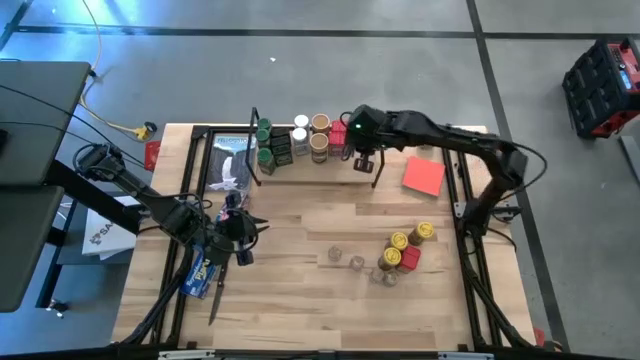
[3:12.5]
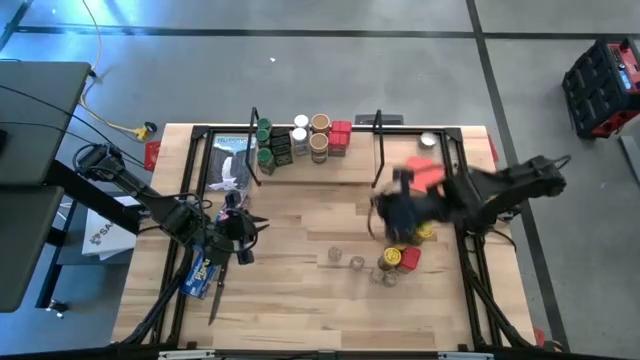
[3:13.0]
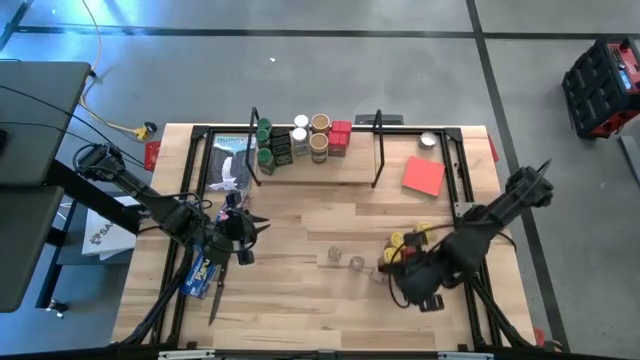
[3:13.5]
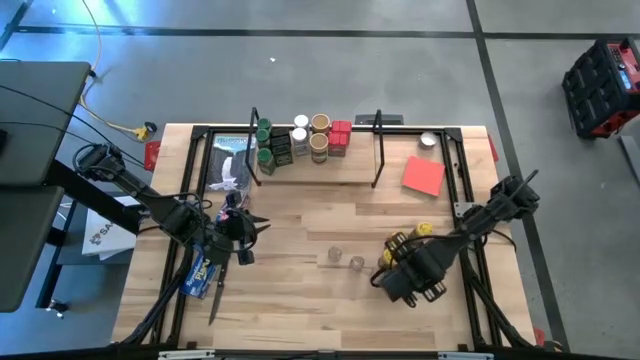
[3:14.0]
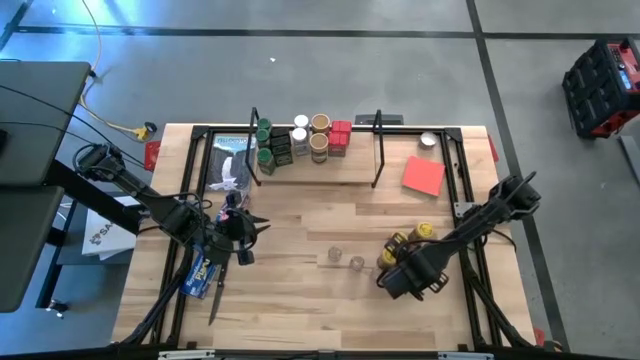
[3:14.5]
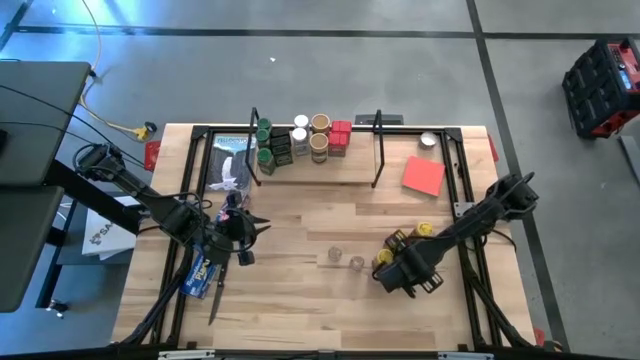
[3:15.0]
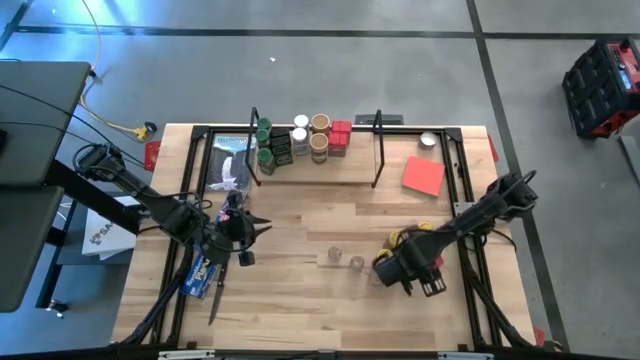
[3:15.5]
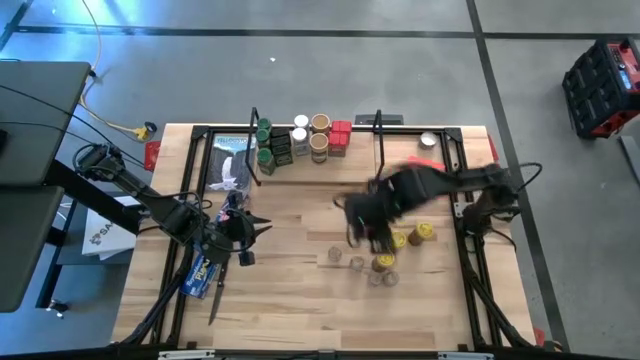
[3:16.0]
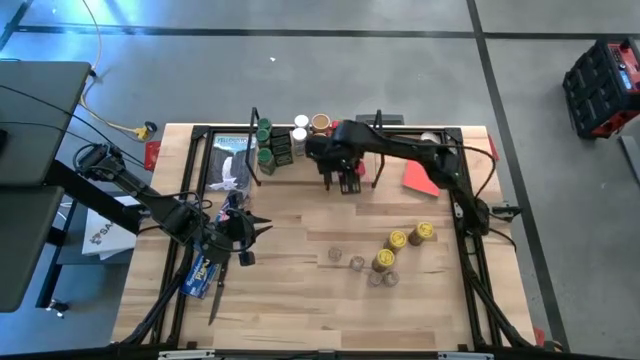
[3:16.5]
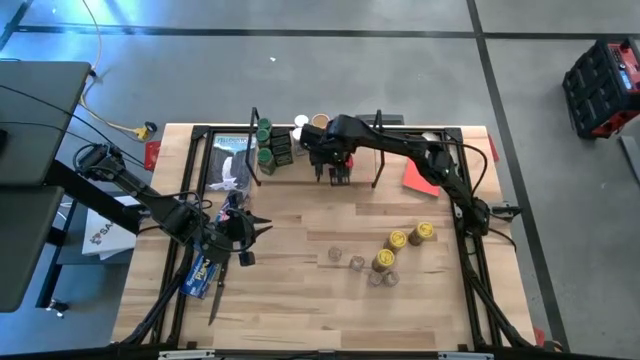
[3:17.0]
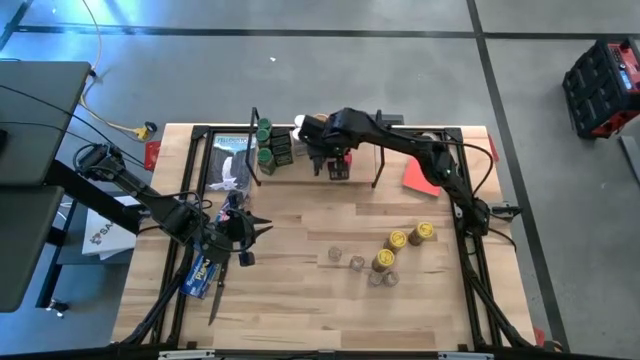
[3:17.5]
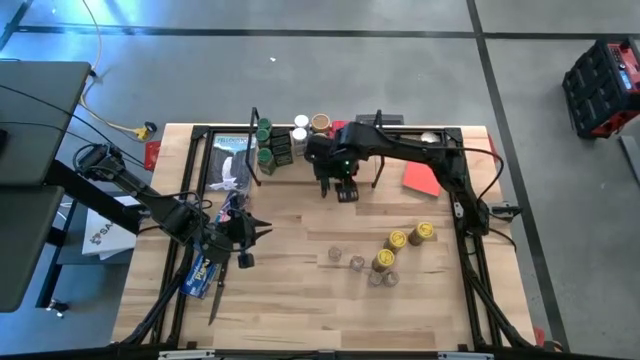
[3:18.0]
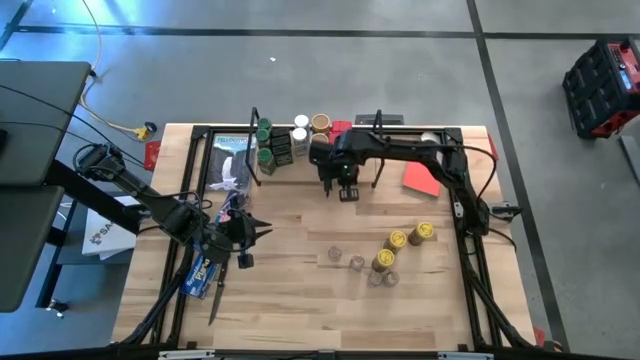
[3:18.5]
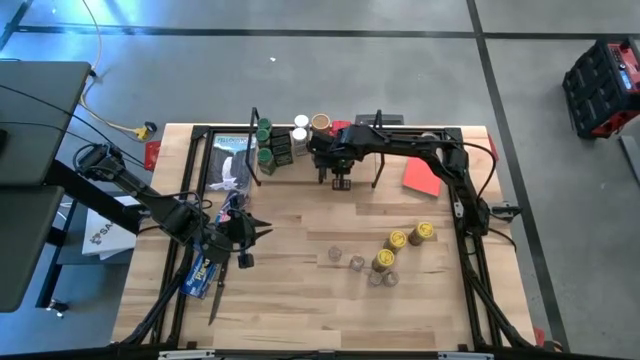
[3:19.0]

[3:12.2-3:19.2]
Task: Shelf spices
Put the red seasoning can on the shelf and align it with the other red seasoning cans

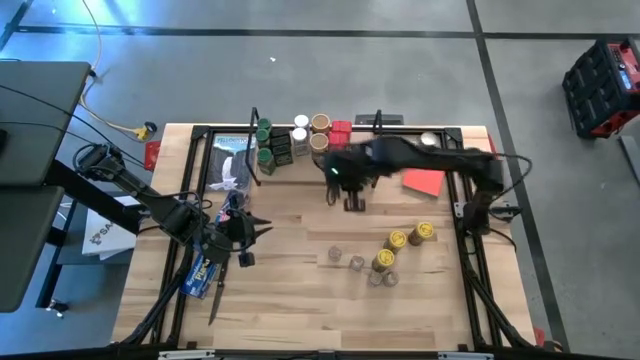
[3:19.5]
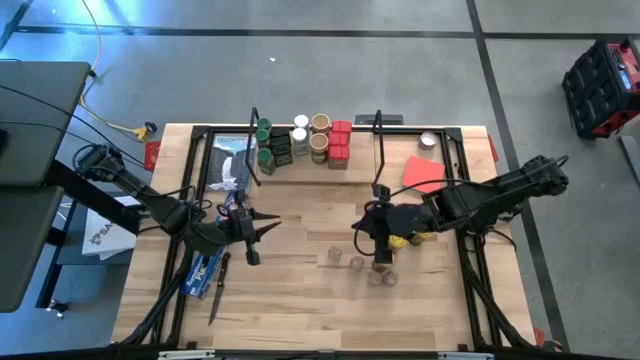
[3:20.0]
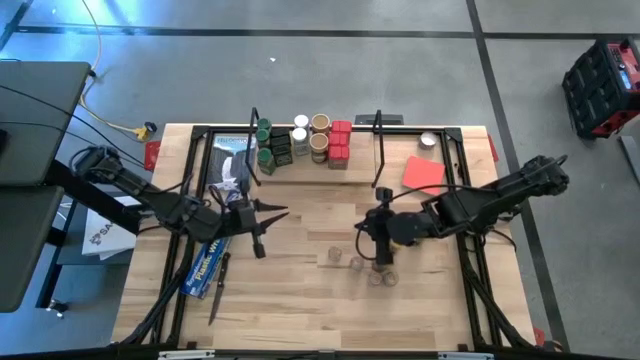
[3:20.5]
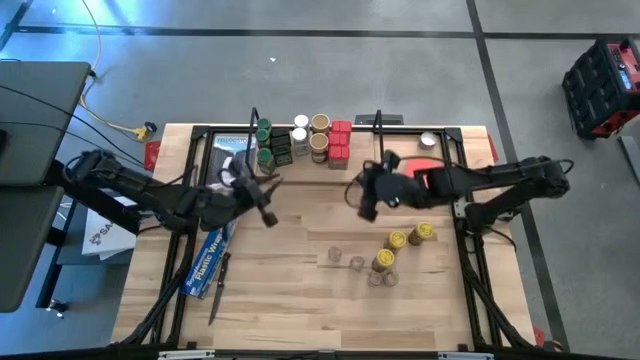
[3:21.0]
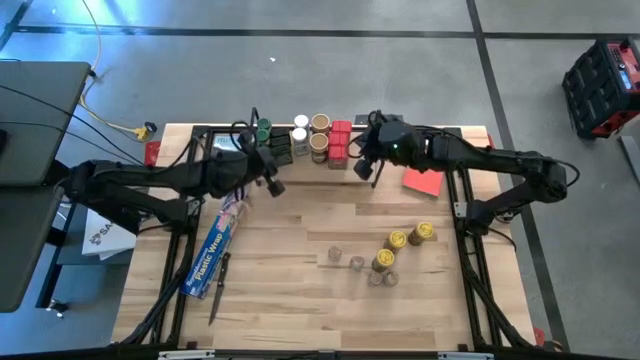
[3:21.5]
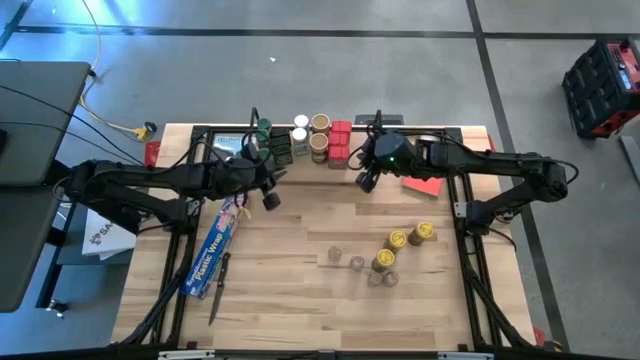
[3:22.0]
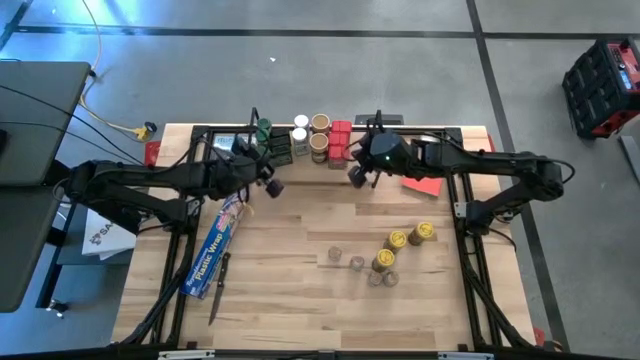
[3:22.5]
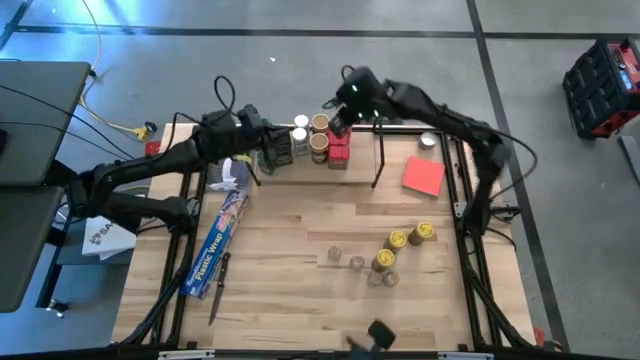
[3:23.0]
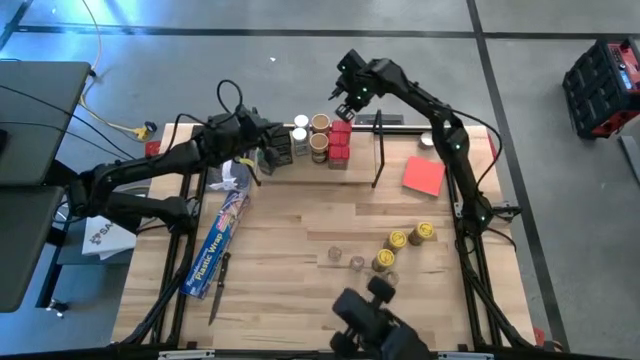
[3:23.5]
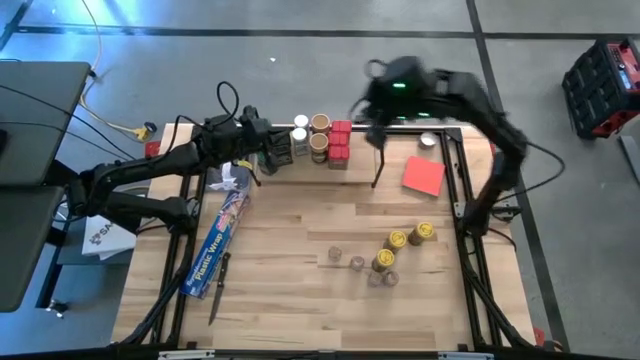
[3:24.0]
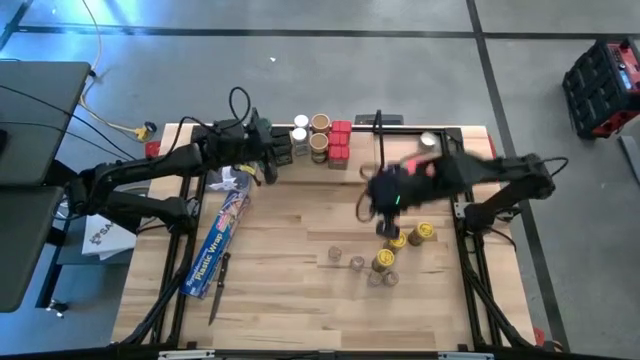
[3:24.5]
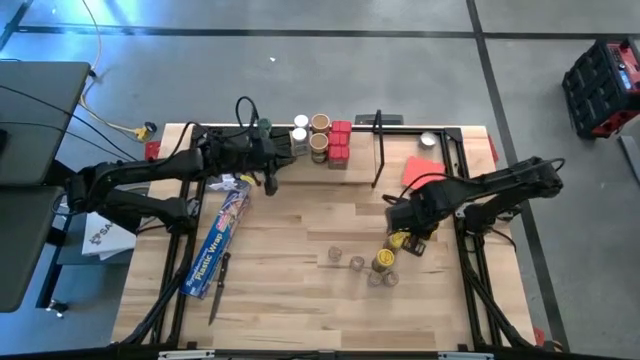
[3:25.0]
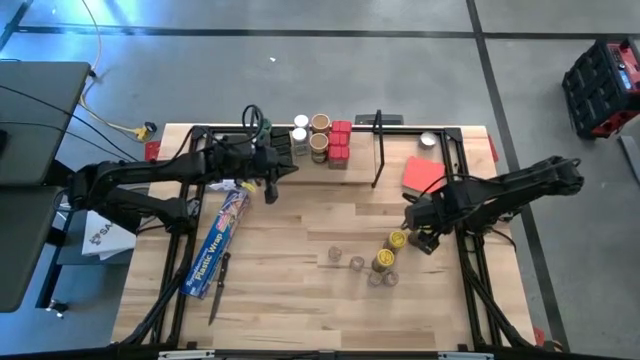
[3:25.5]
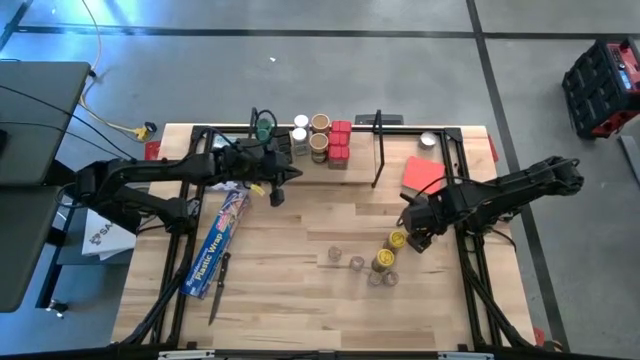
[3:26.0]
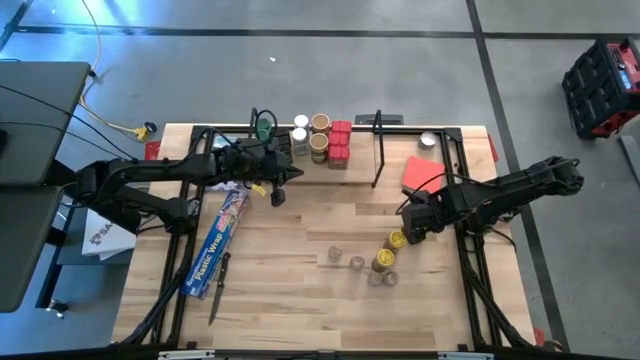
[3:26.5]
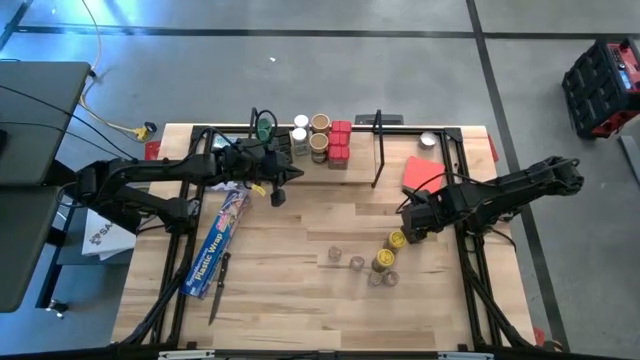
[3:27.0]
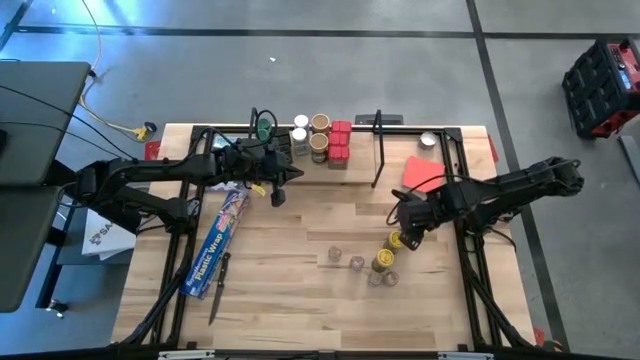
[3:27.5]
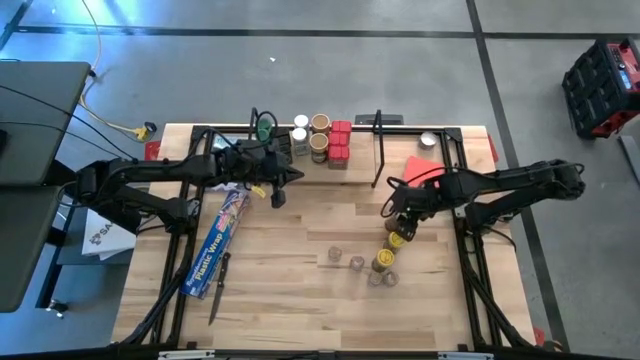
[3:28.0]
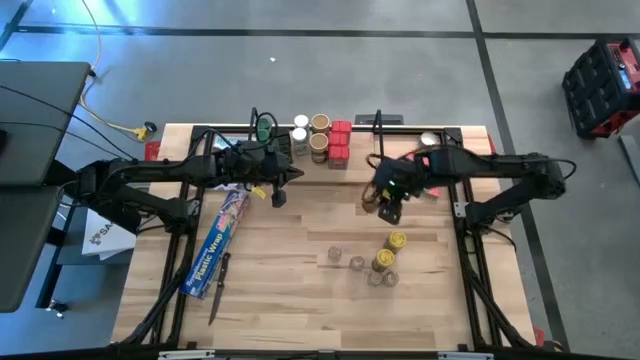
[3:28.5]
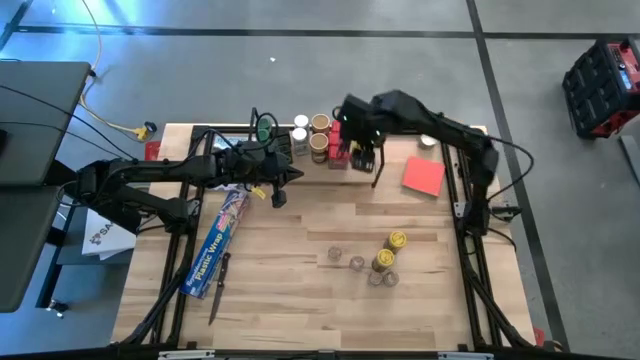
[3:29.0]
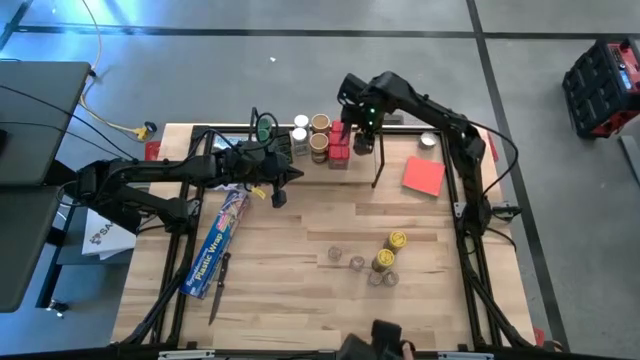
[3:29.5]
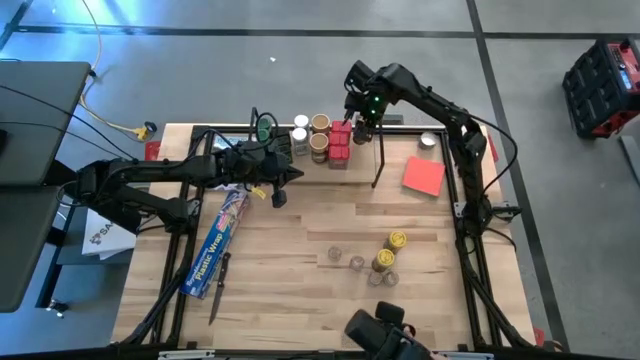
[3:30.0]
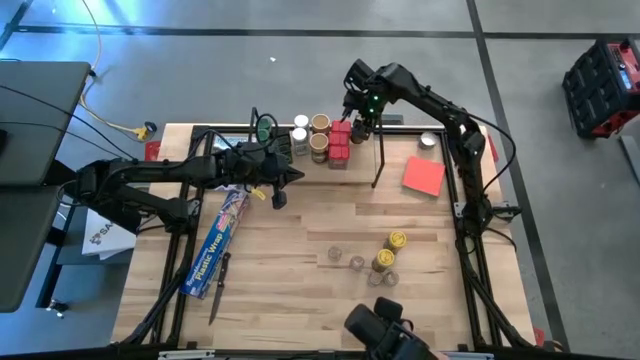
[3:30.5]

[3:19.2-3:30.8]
Put the yellow seasoning bottle on the shelf to the top right of the red seasoning can

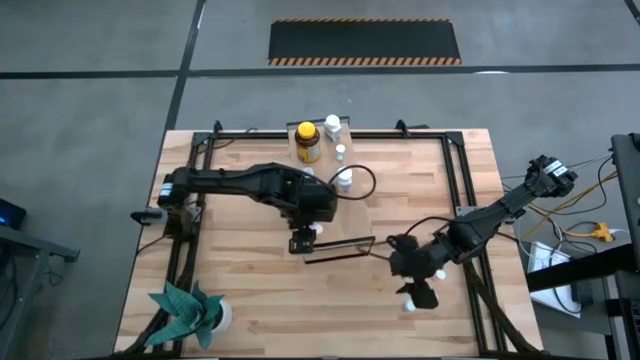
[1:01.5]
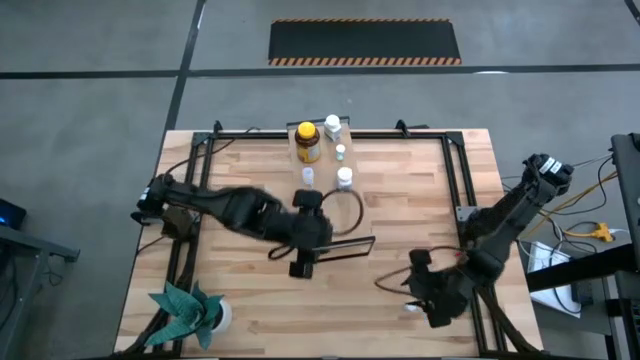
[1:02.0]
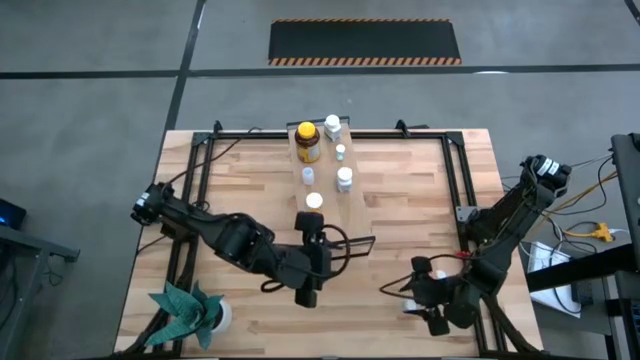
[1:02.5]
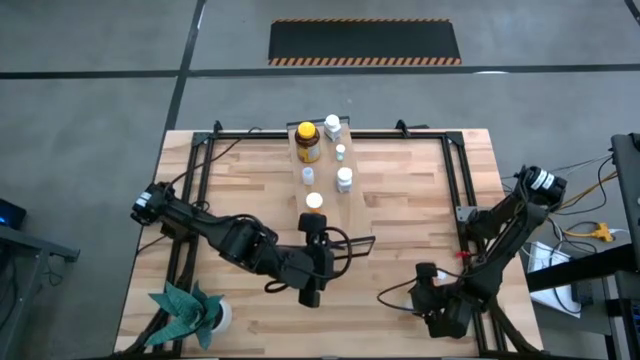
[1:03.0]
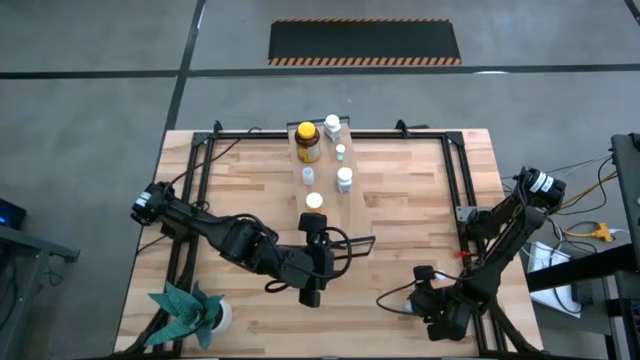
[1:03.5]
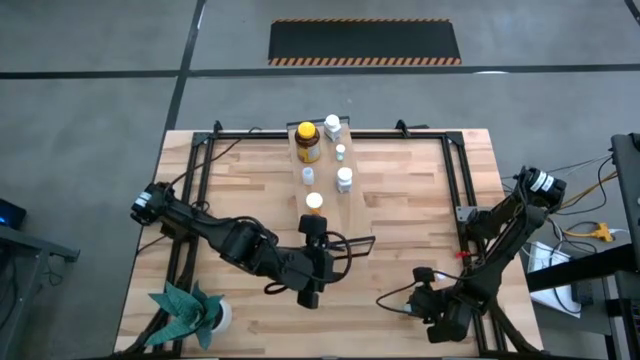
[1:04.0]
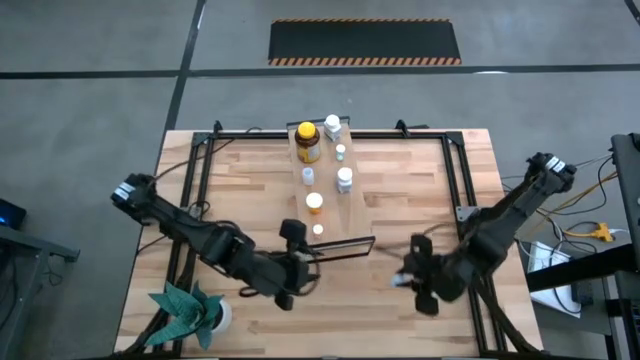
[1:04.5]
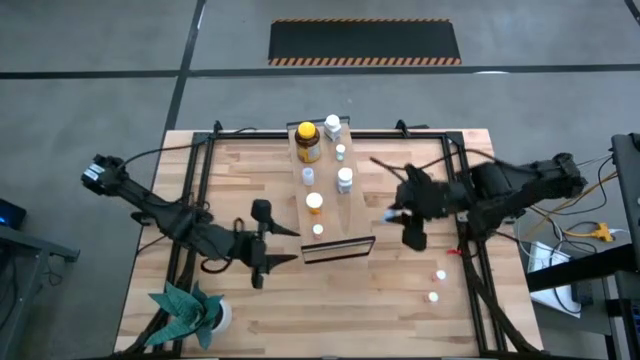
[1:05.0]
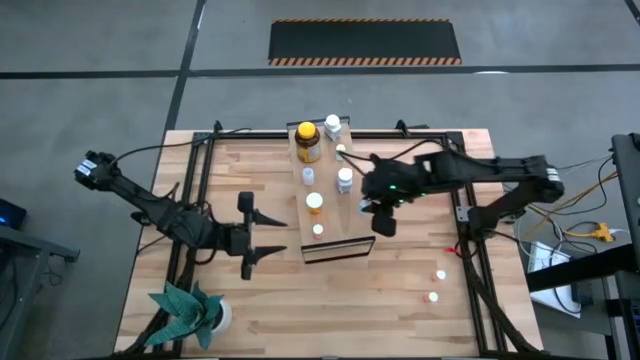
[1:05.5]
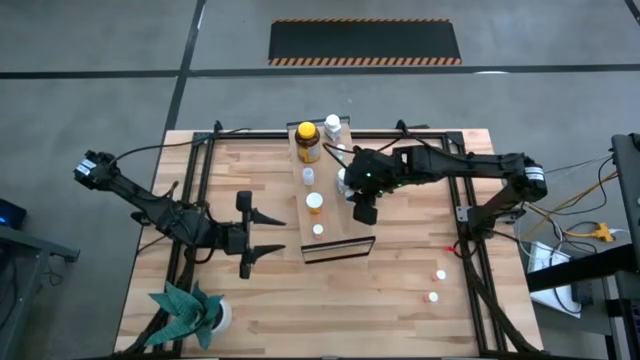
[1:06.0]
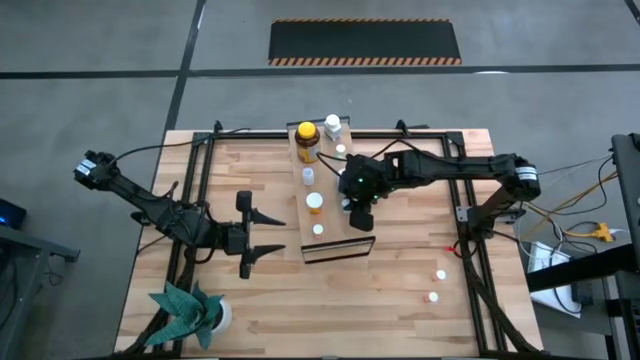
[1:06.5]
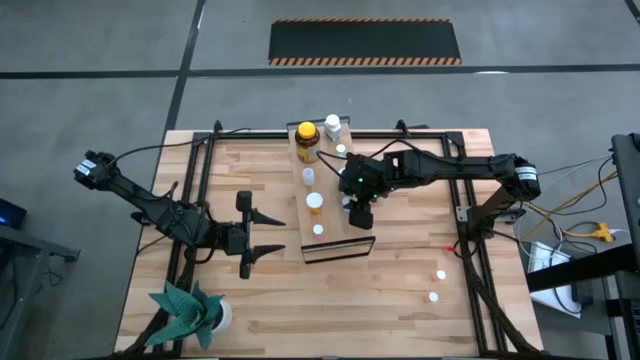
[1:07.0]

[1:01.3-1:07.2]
Task: Pick and place medicine bottles onto shelf by color
Put the blue pill bottle on the shelf
